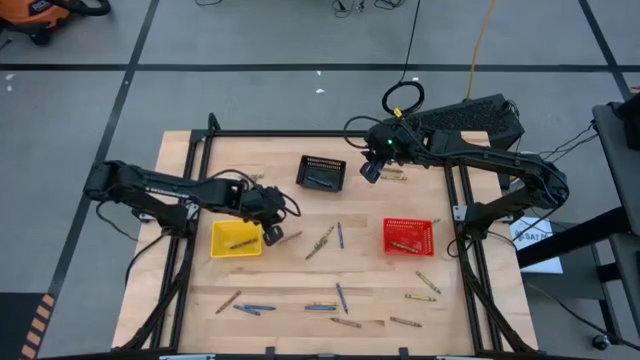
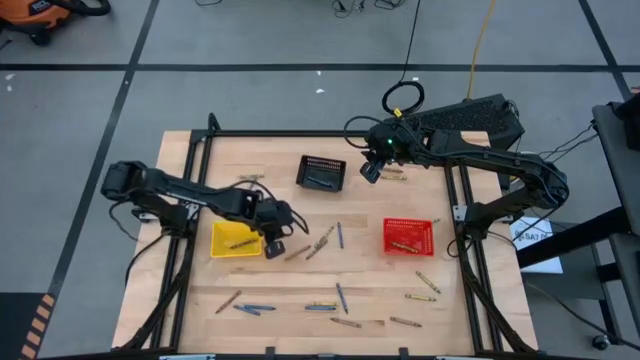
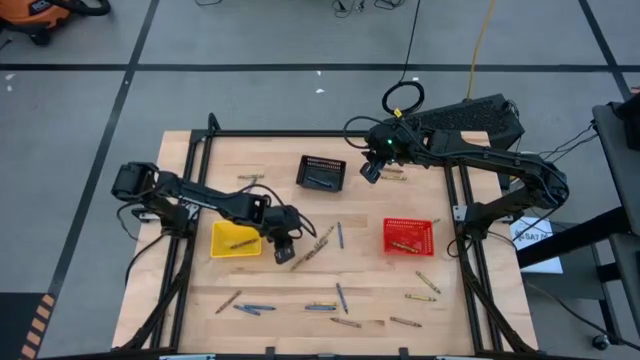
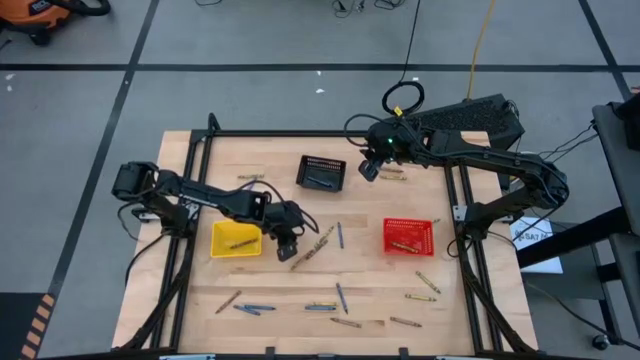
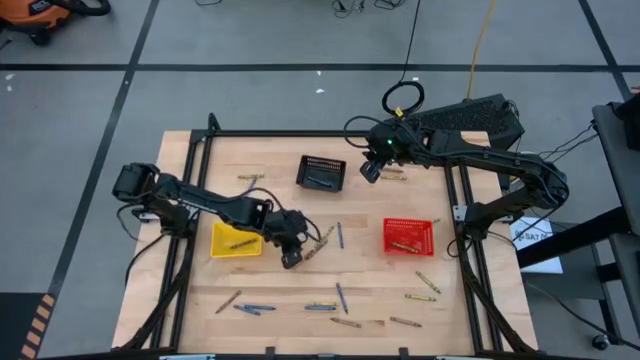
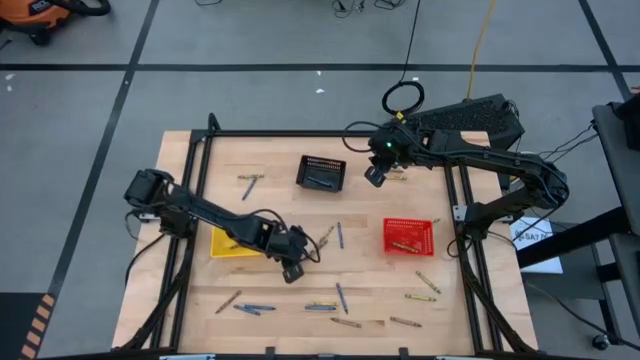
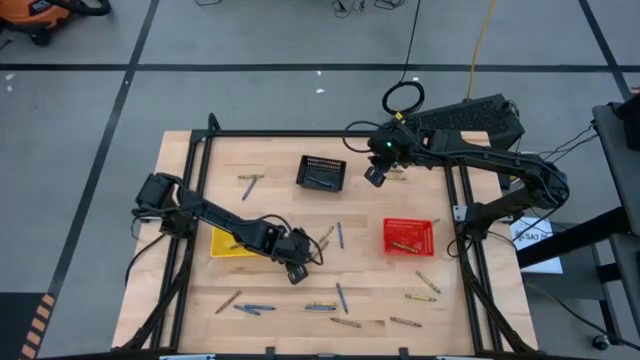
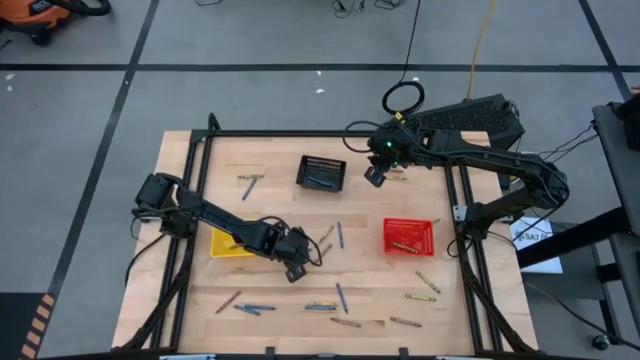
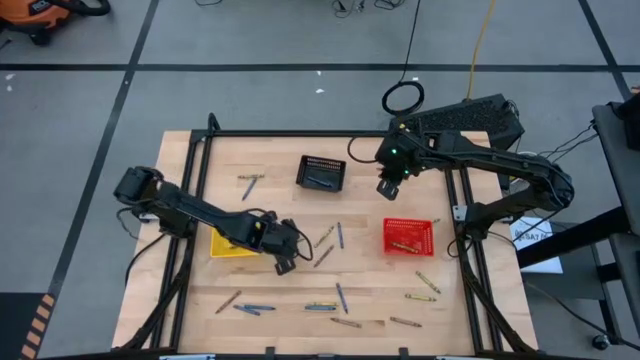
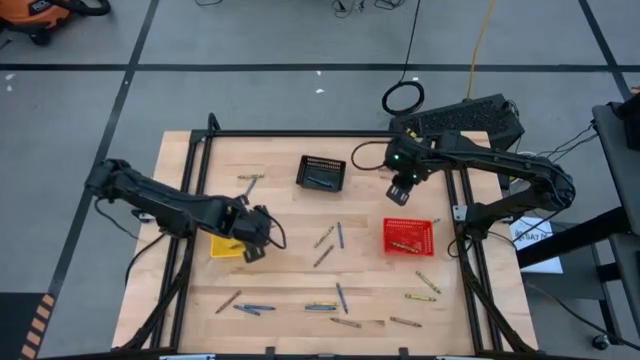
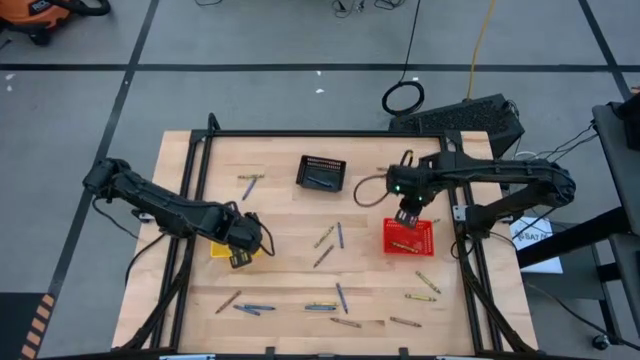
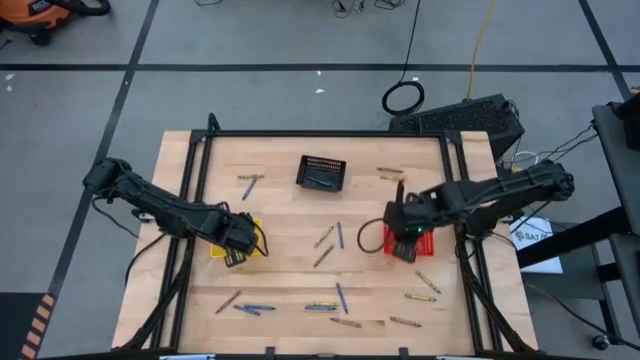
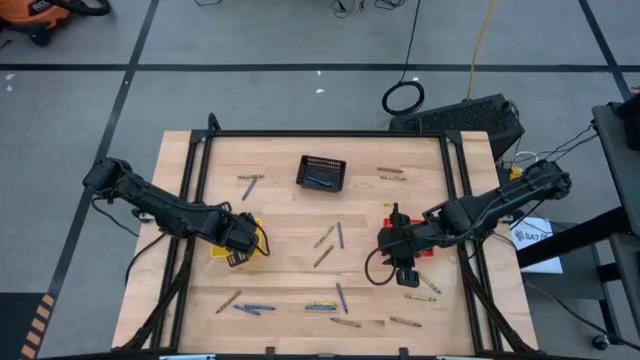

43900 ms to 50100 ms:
Task: Sort crayons
Put the brown crayon into the yellow bin

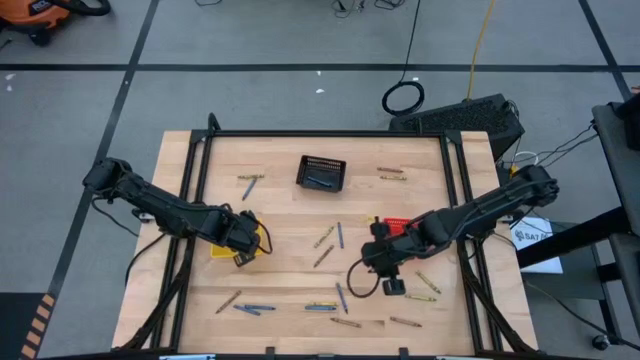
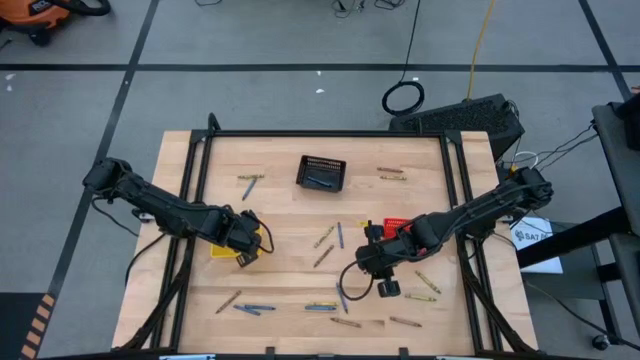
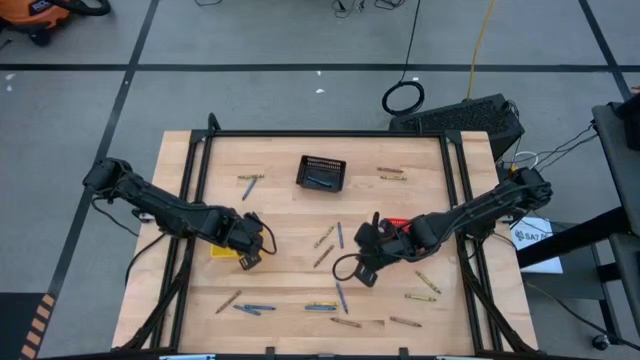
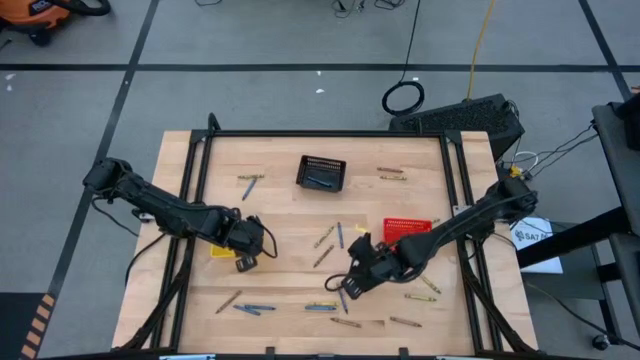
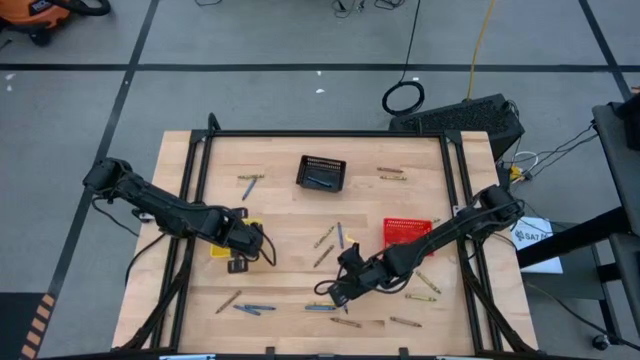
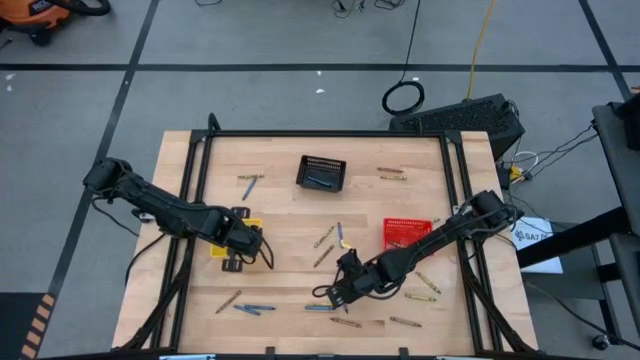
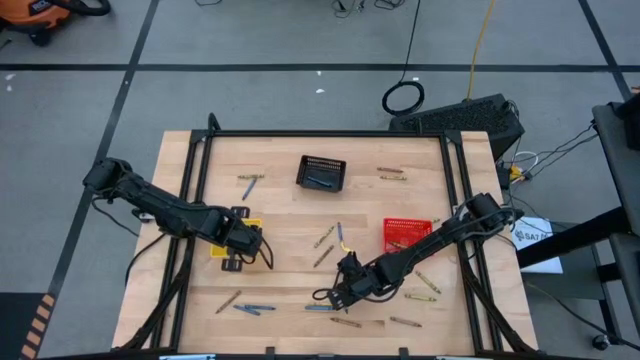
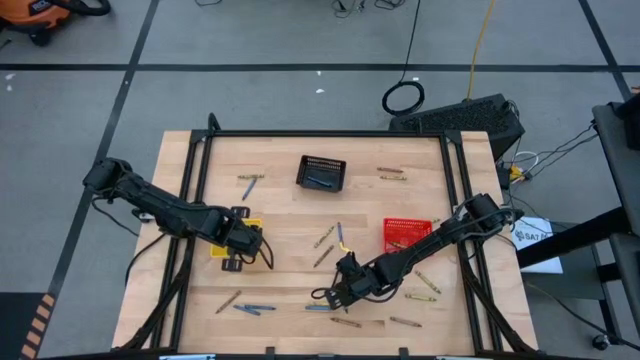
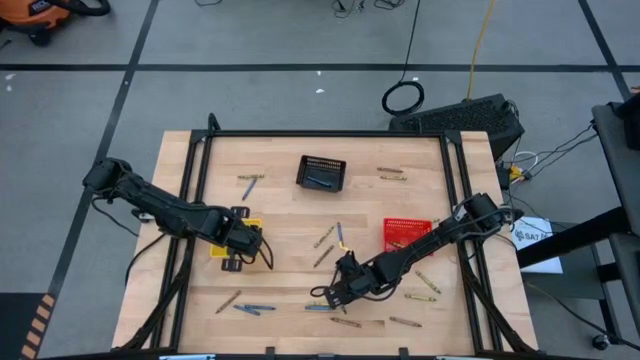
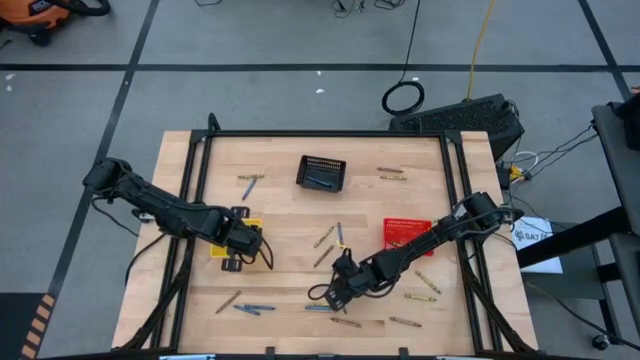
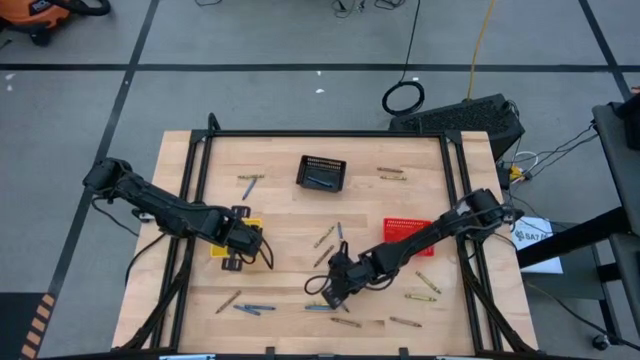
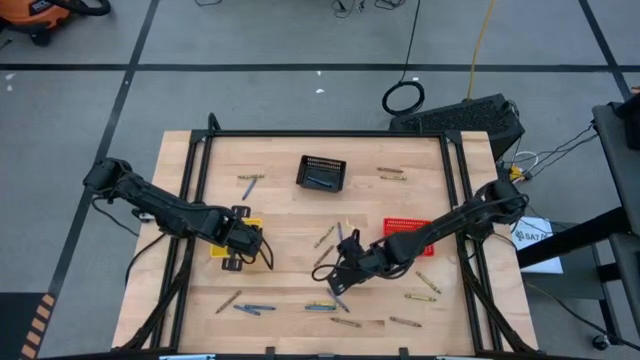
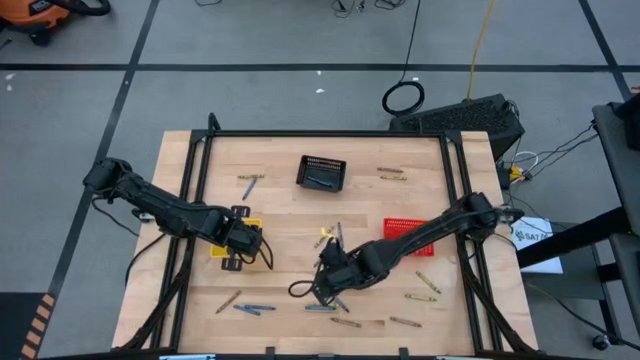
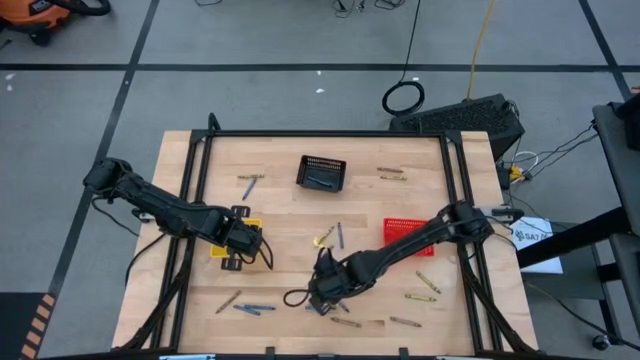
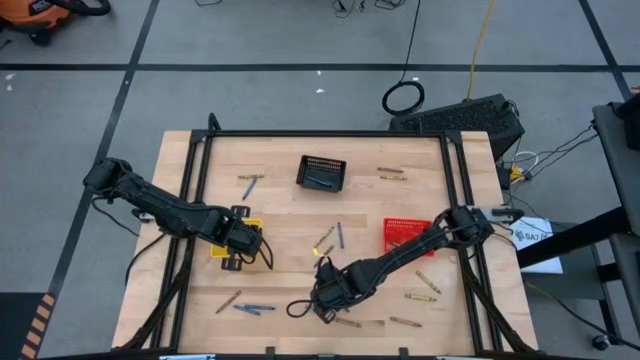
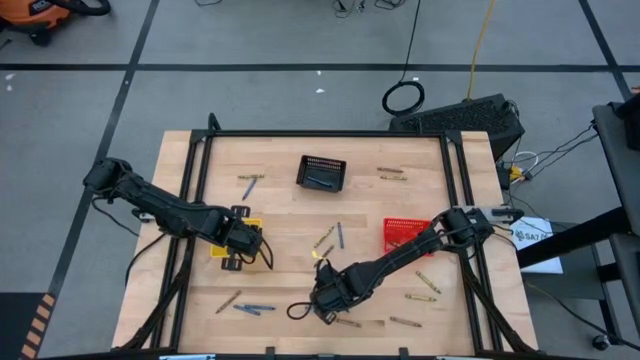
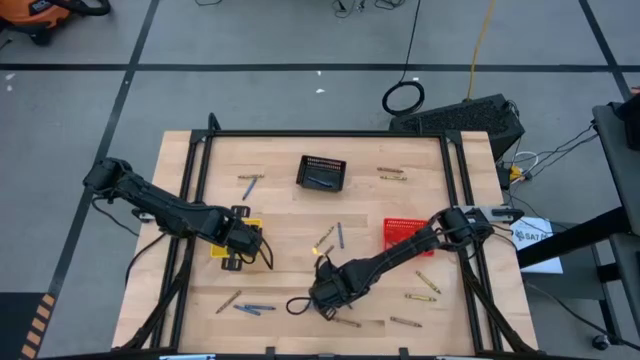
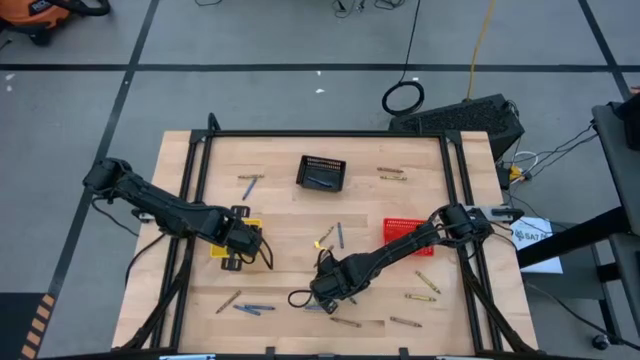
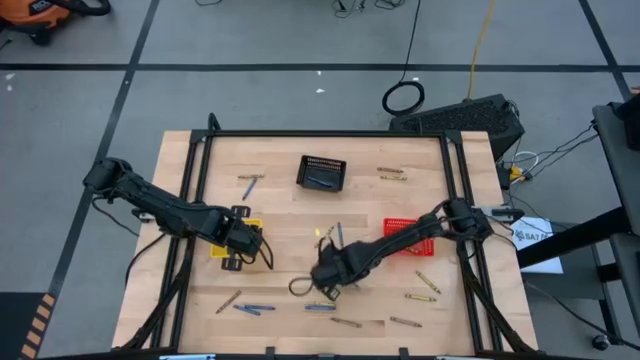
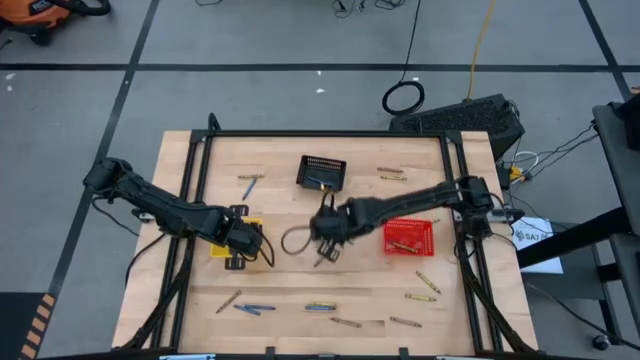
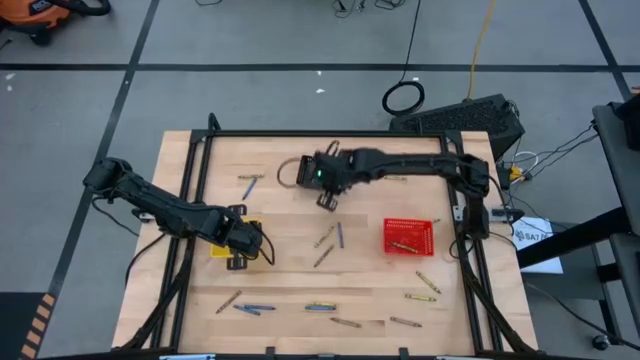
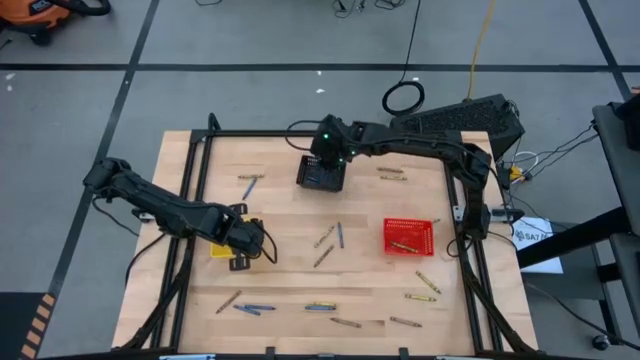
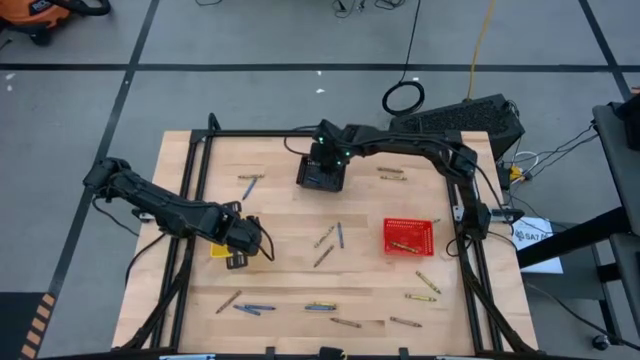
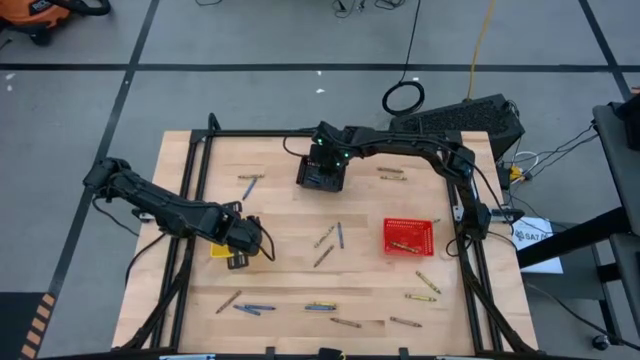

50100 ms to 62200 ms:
Put the blue crayon into the black bin

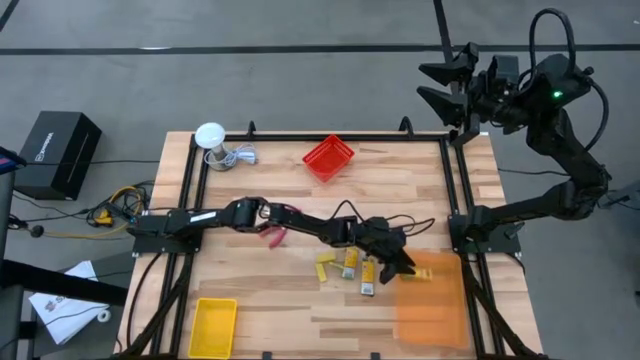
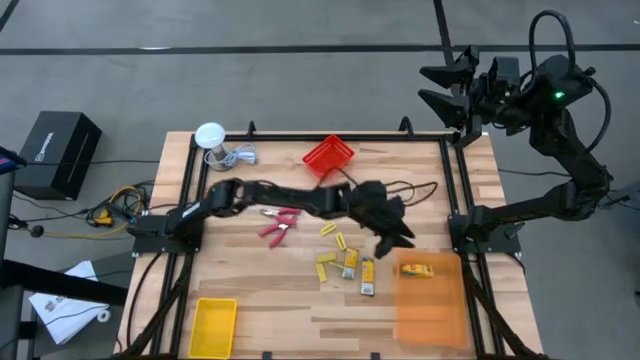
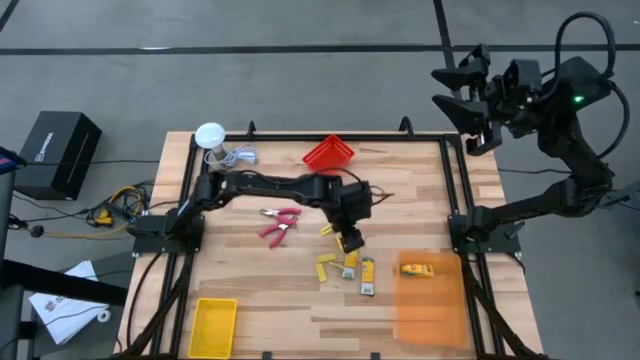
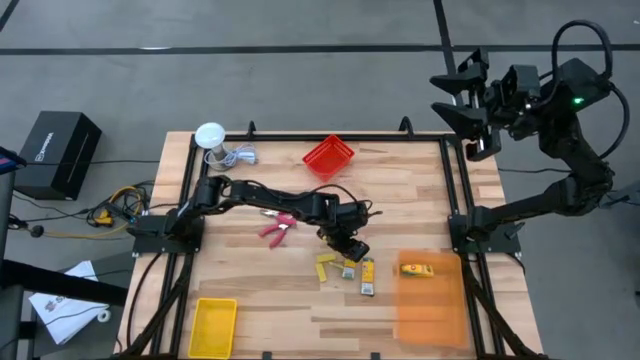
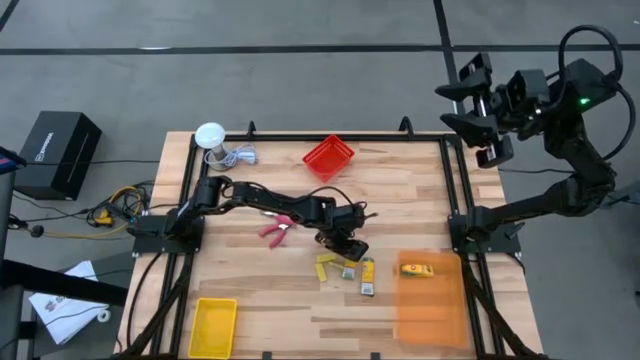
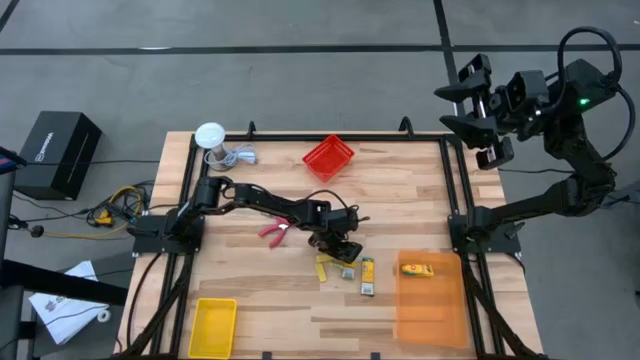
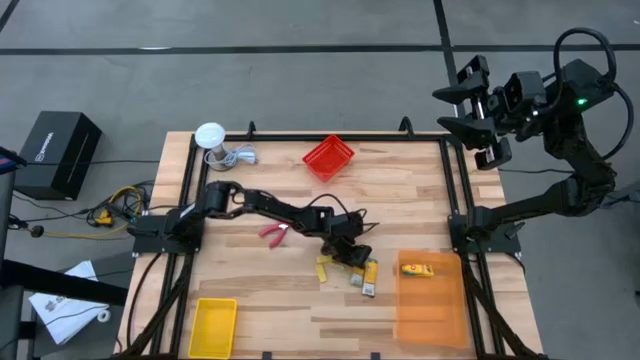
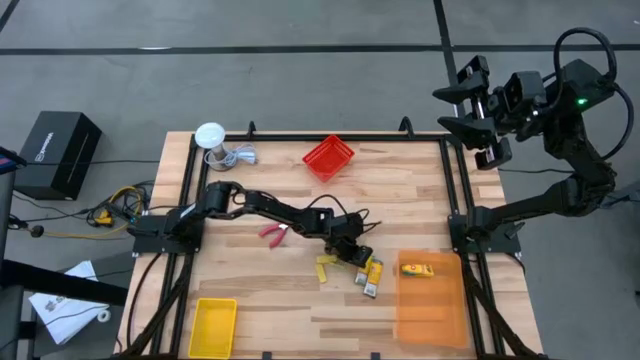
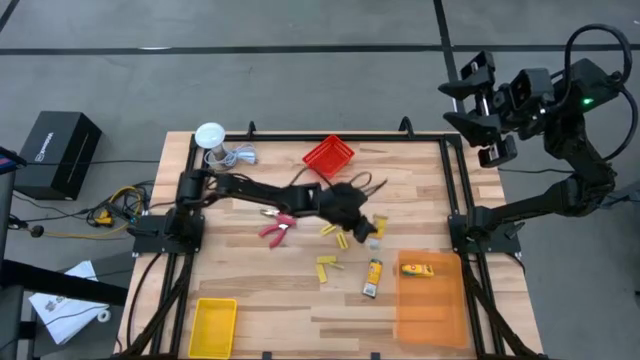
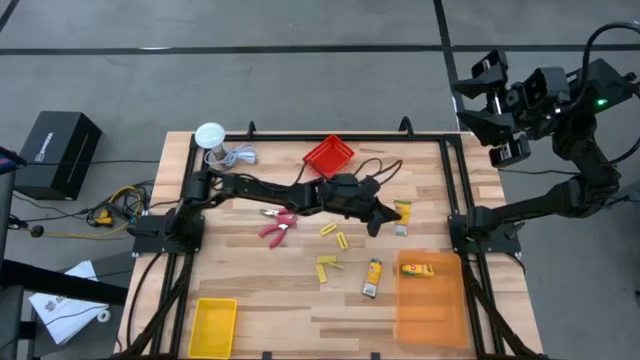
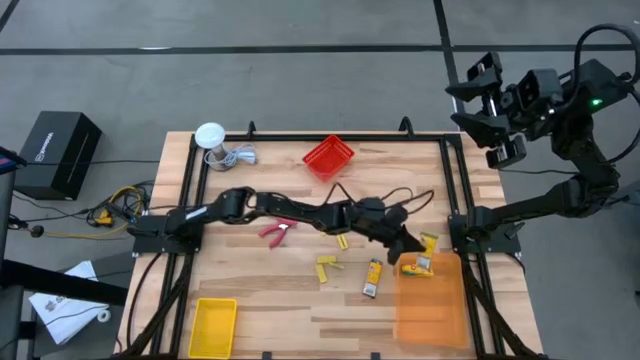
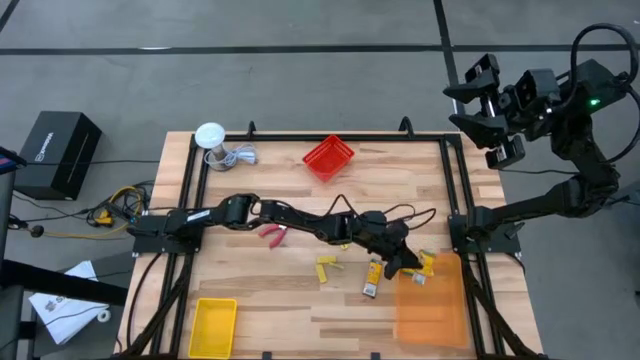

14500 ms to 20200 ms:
Task: Pick & Place School Supplies
Put the crayon box into the orange bin
